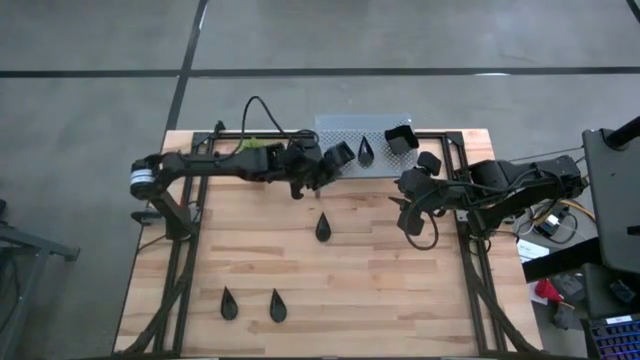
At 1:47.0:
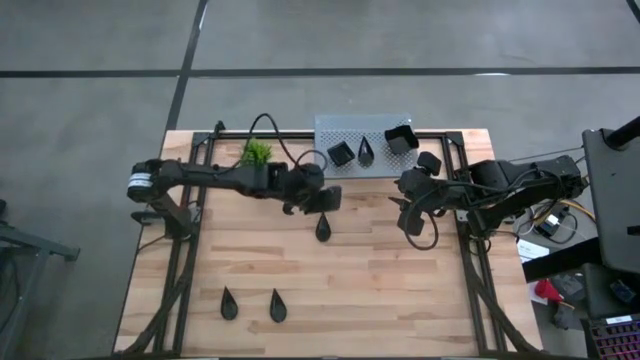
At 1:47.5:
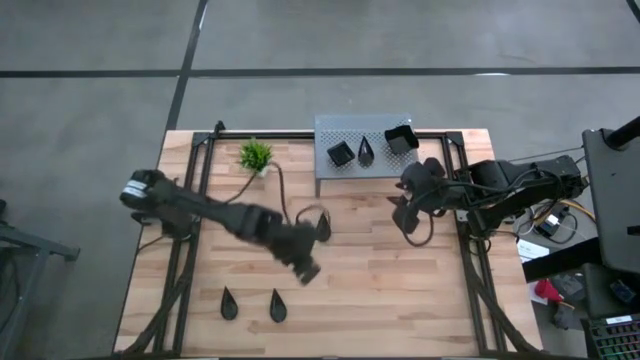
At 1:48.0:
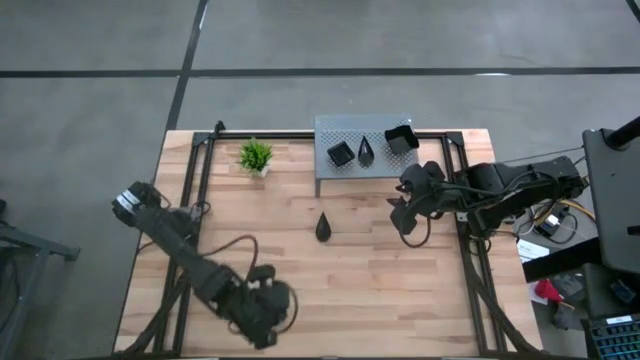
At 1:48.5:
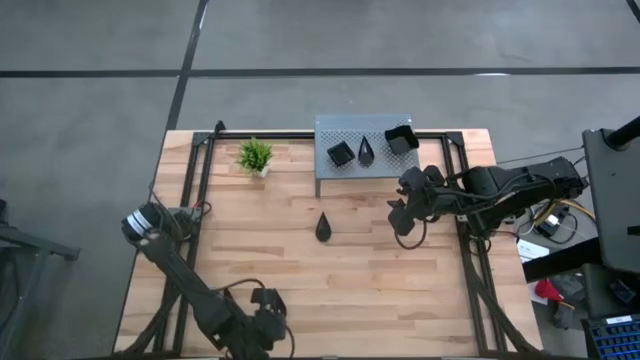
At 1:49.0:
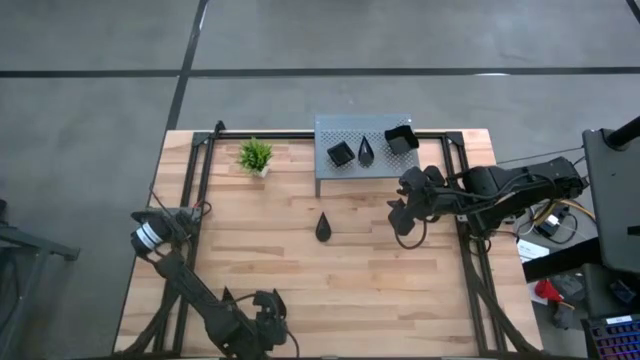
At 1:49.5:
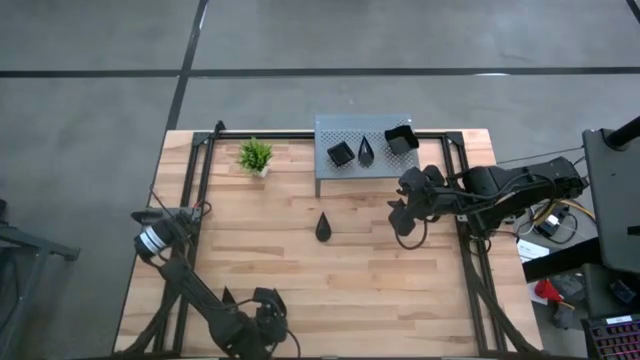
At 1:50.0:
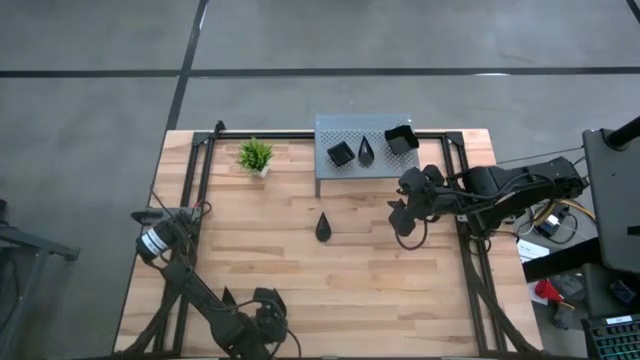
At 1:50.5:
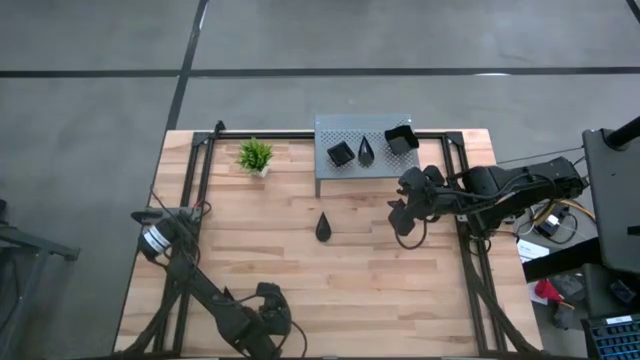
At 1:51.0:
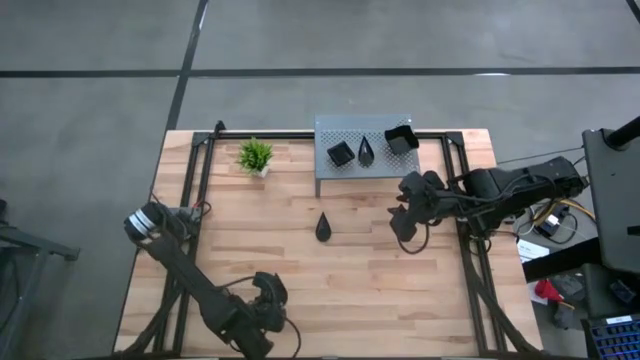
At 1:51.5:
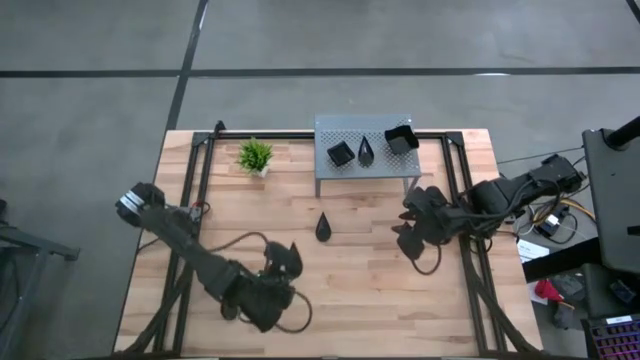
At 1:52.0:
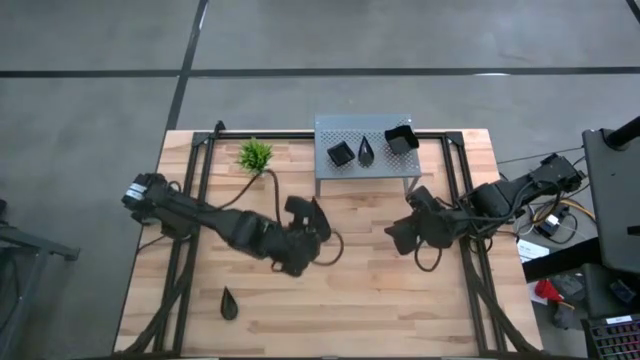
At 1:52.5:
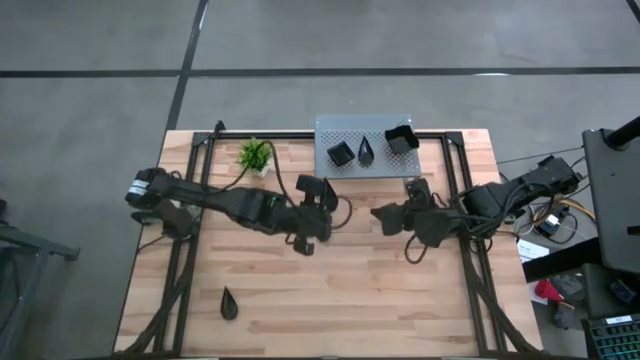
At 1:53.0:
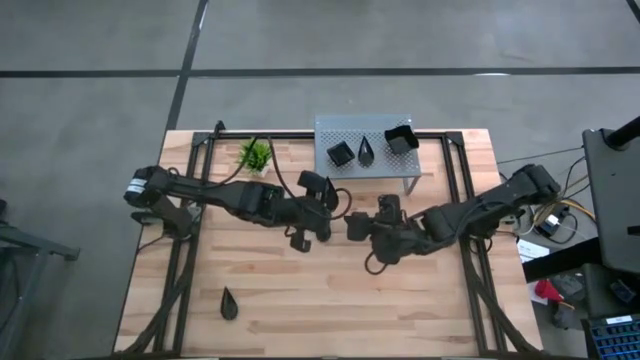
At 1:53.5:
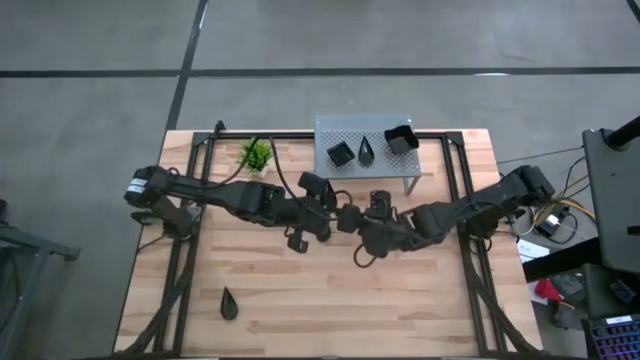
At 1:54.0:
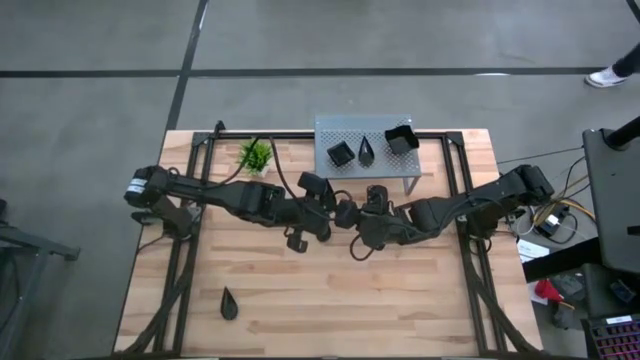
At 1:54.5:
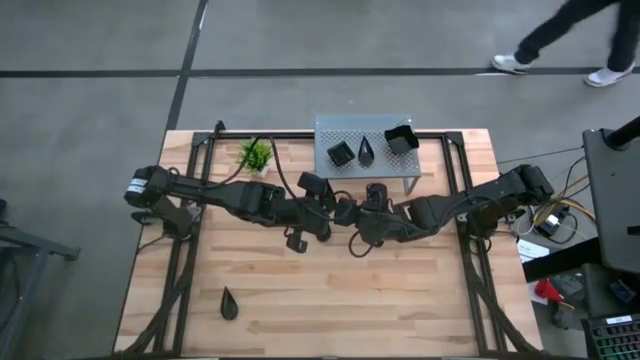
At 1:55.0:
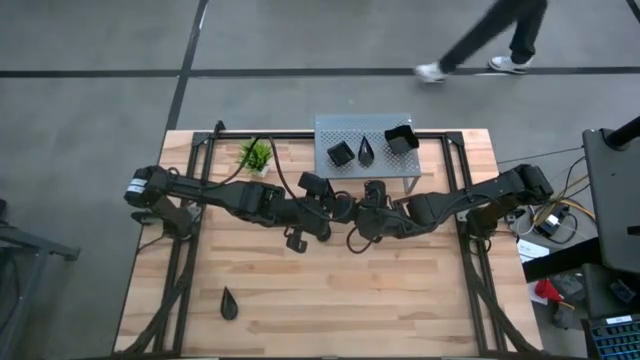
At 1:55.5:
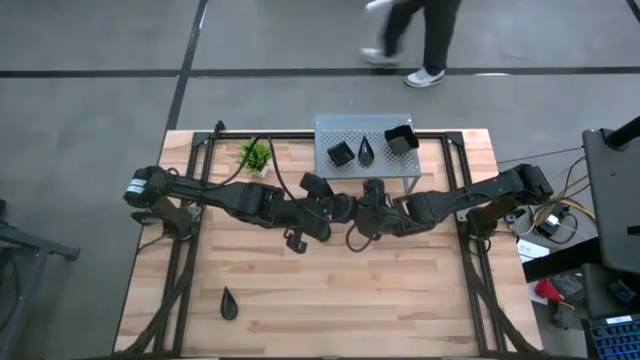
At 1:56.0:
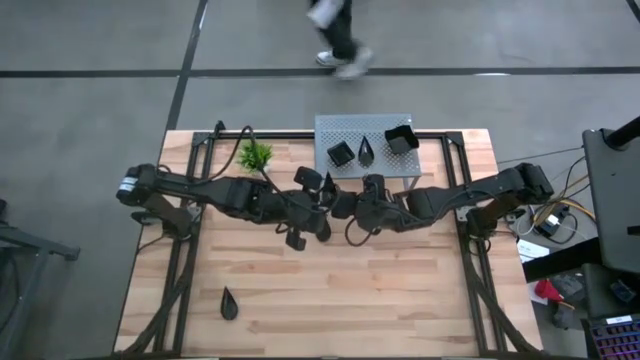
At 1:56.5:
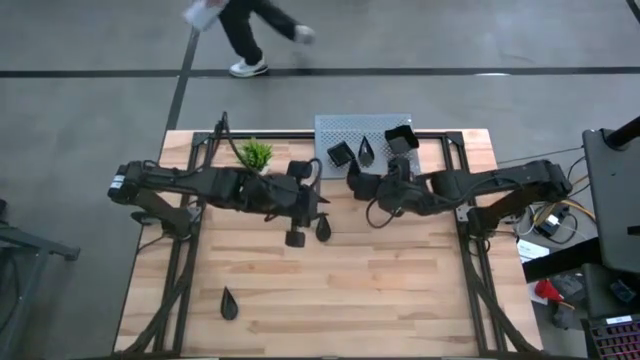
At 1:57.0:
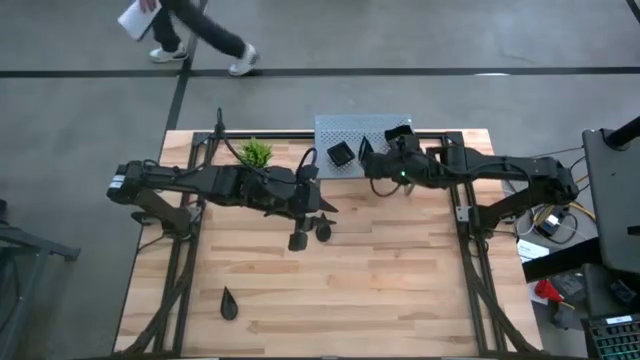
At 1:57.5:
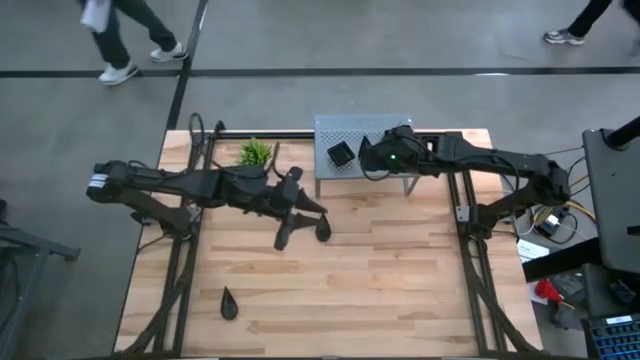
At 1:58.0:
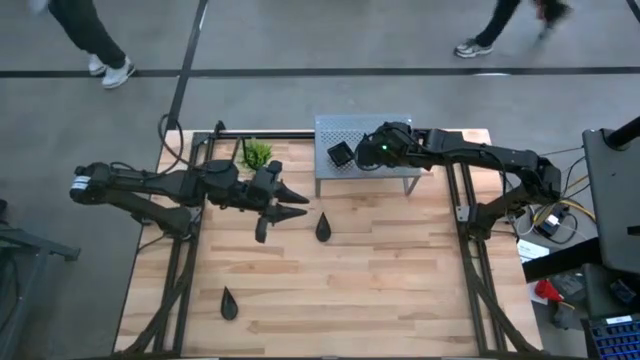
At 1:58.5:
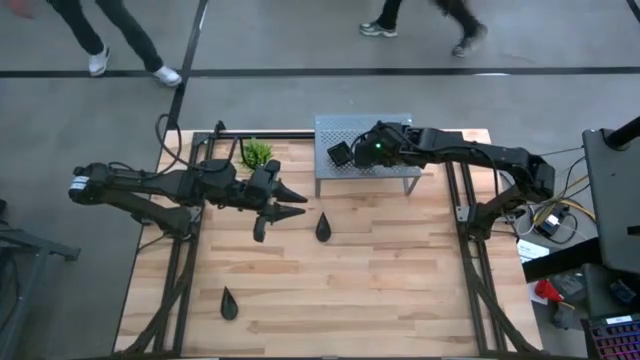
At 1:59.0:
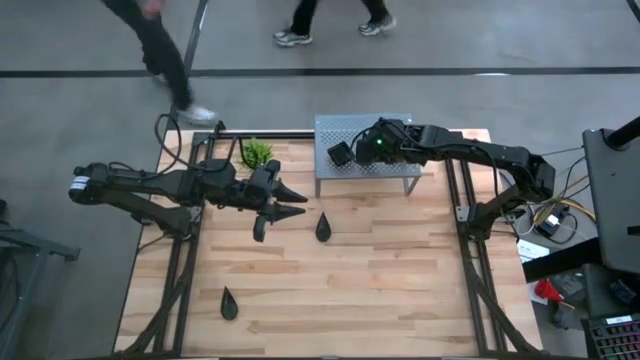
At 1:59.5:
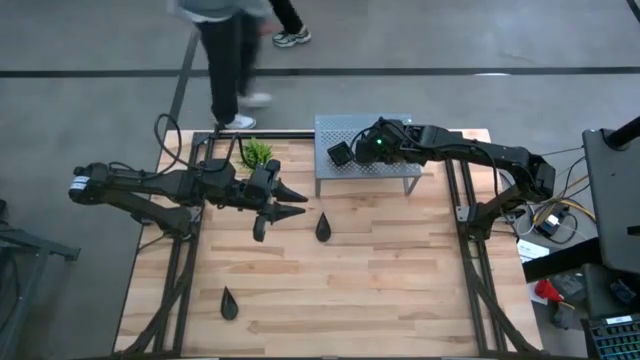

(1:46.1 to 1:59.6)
Task: Pick & Place Mini shaped plates
Stack the black drop-shaped plate on top of the black drop-shaped plate on the shelf

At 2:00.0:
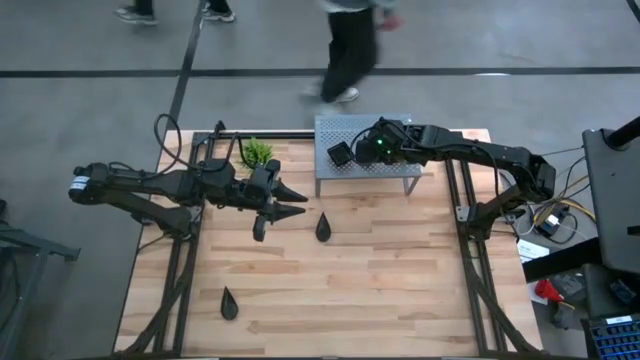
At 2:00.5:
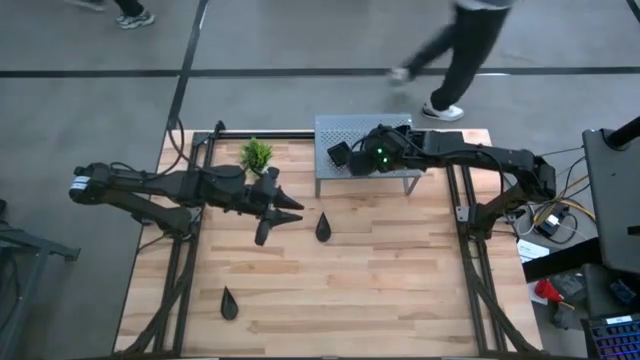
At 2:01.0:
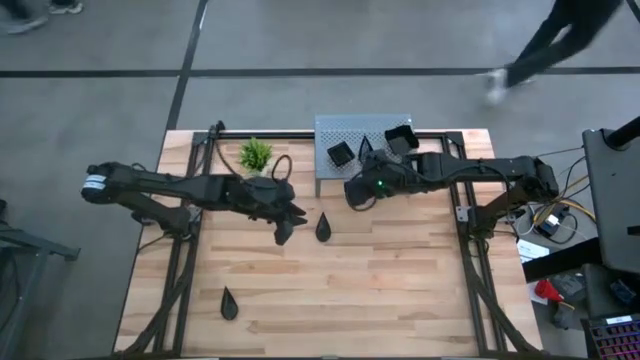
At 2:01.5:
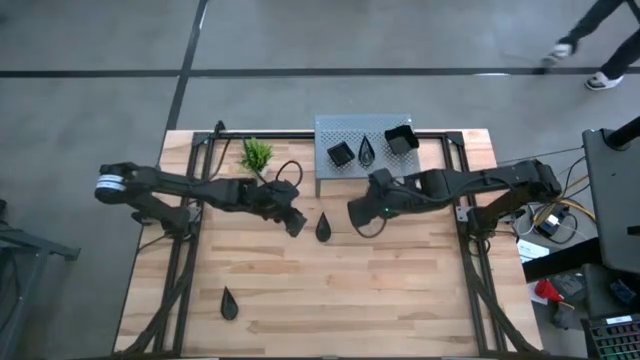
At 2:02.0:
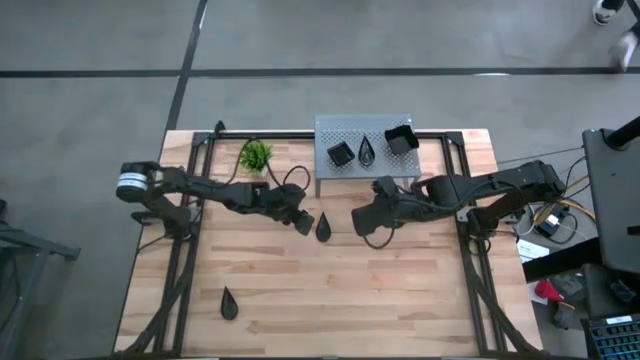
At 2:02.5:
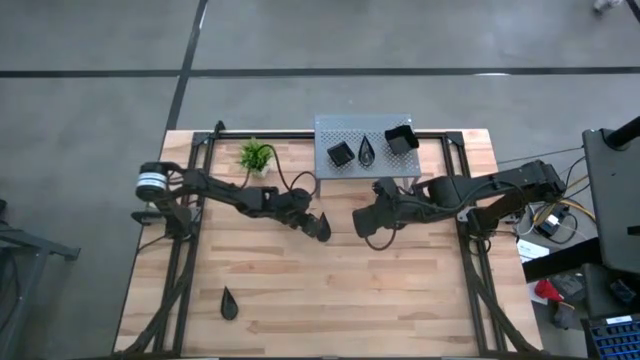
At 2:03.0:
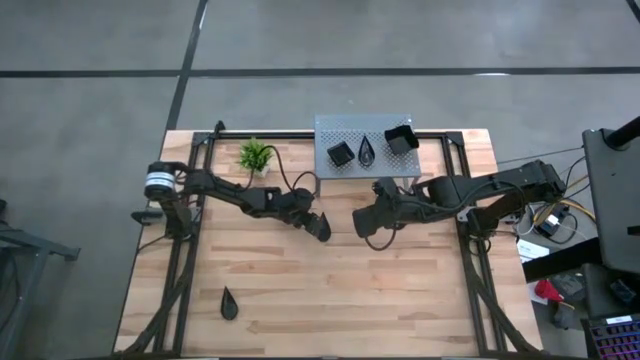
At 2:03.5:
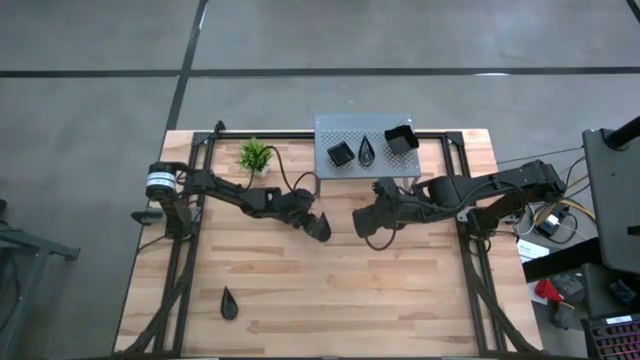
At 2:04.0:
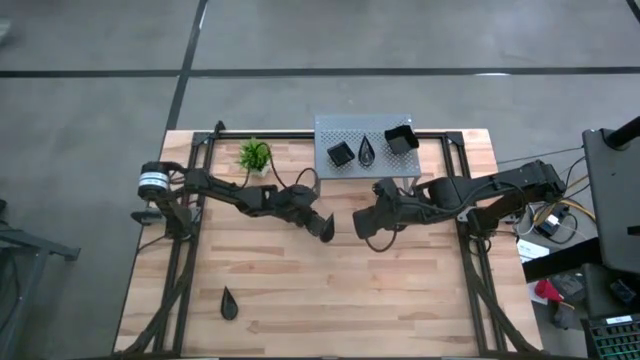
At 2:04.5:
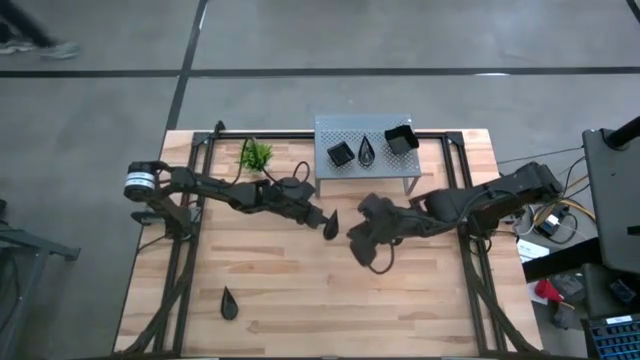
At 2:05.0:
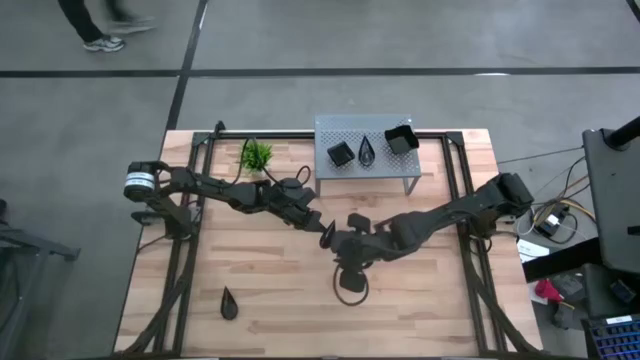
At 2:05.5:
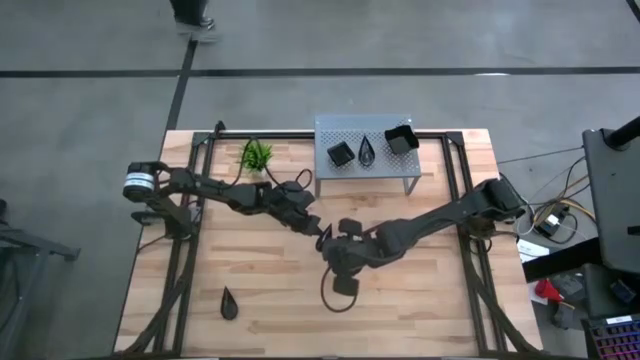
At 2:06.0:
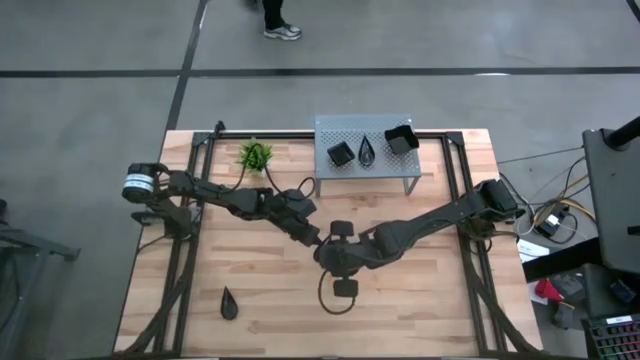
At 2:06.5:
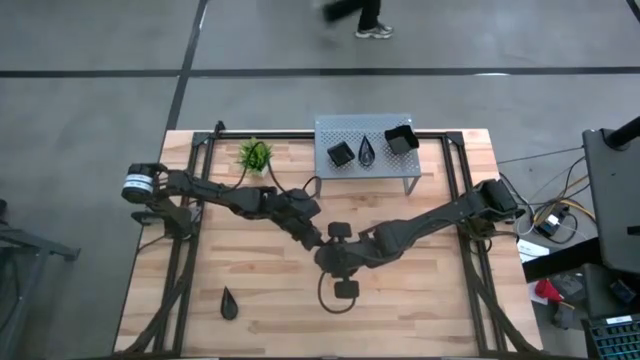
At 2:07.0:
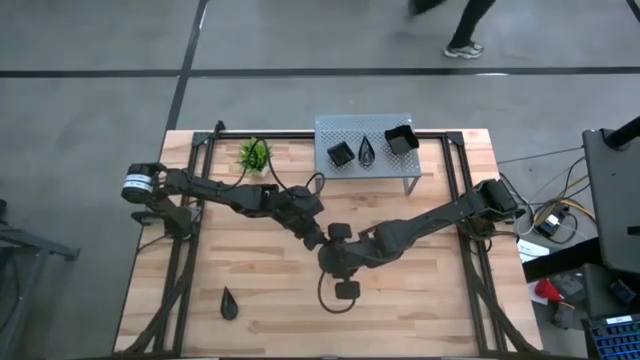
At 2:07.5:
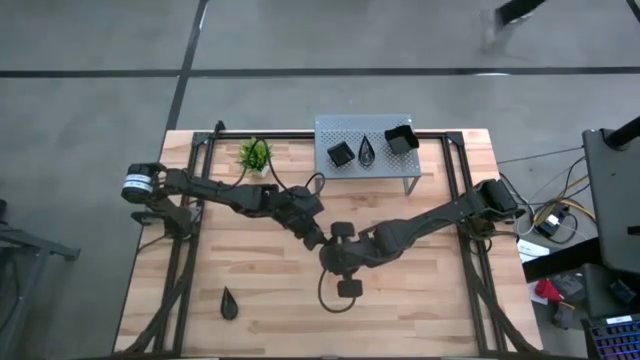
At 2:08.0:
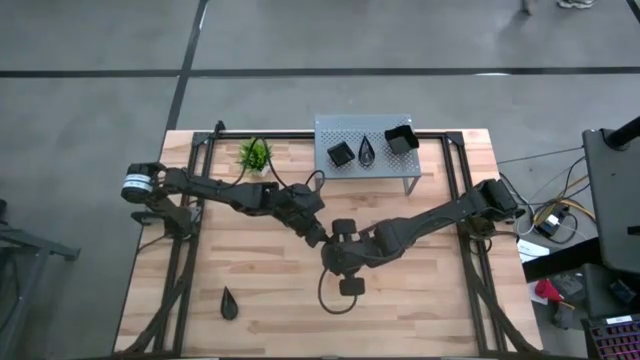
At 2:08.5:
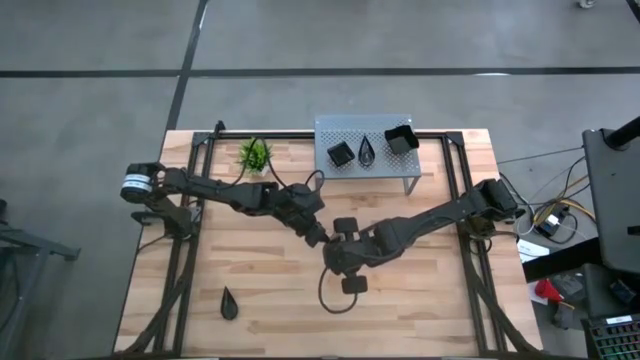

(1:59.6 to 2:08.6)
Stack the black drop-shaped plate on top of the black drop-shaped plate on the shelf
